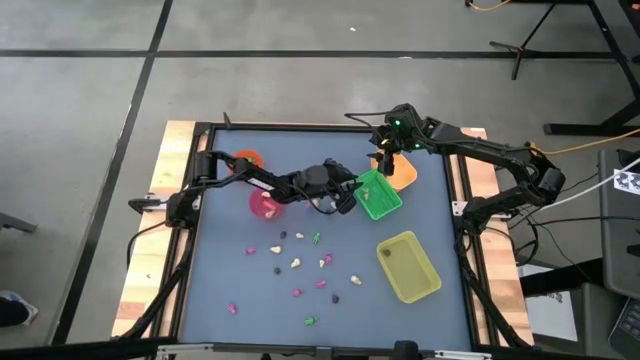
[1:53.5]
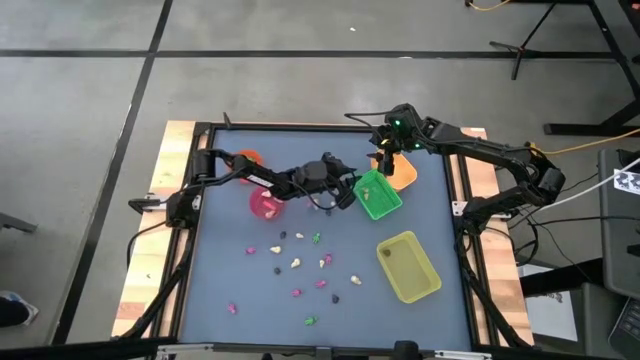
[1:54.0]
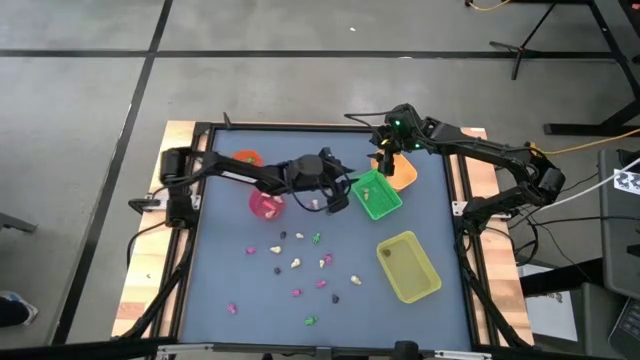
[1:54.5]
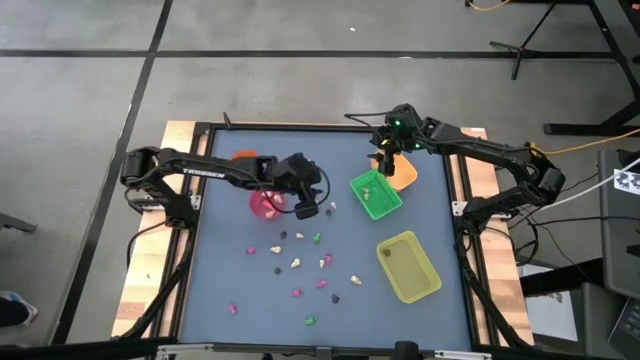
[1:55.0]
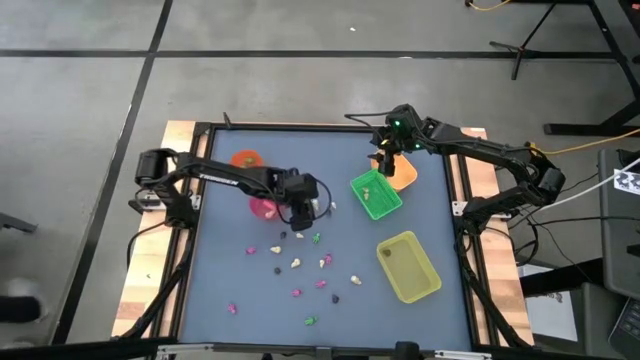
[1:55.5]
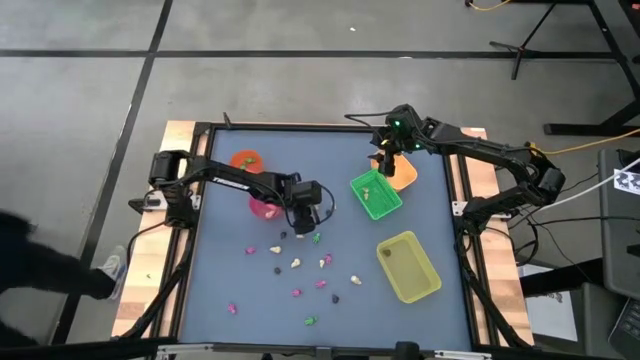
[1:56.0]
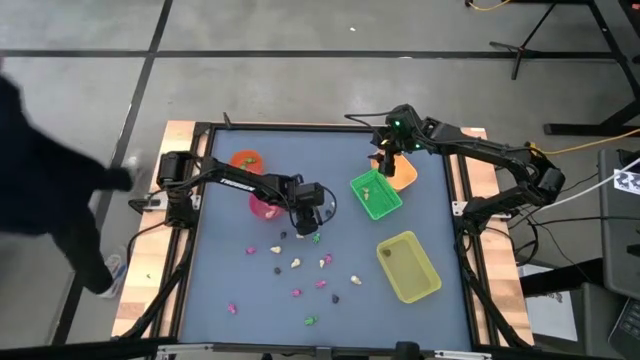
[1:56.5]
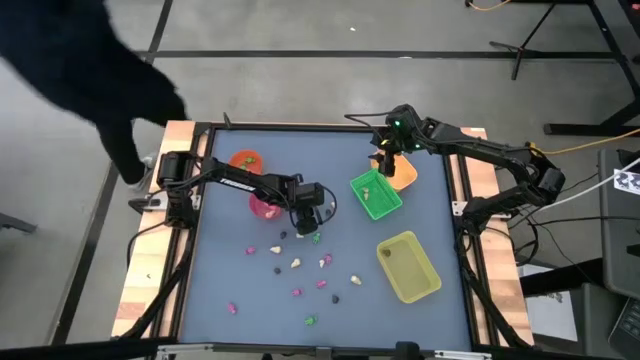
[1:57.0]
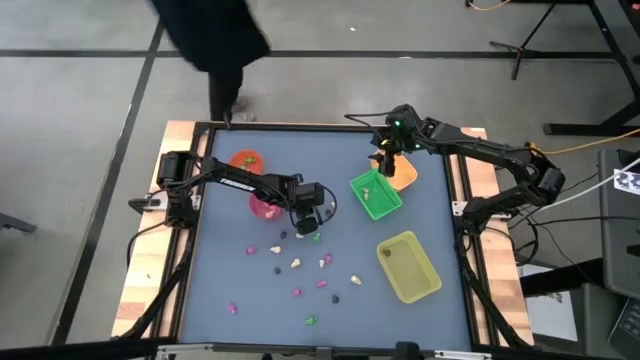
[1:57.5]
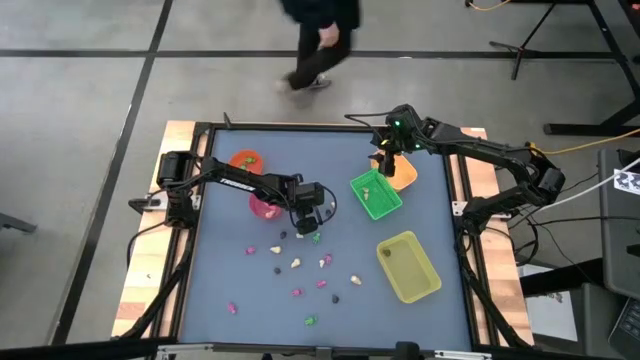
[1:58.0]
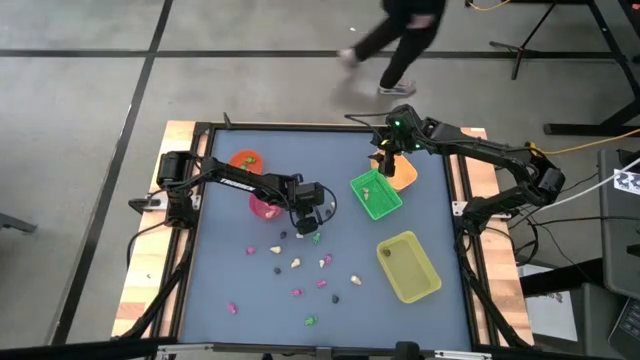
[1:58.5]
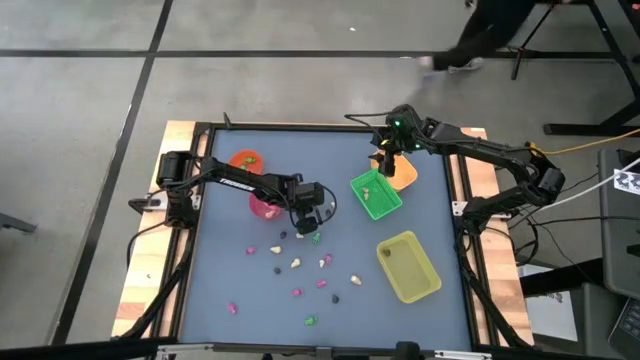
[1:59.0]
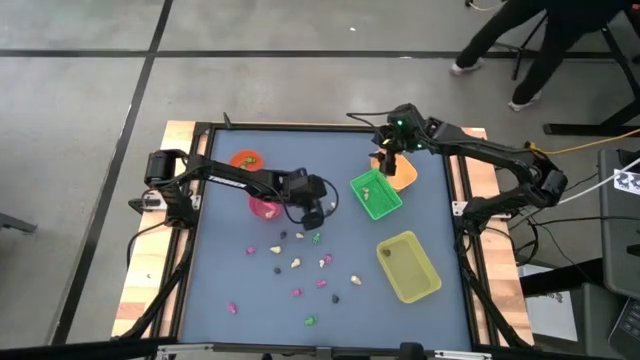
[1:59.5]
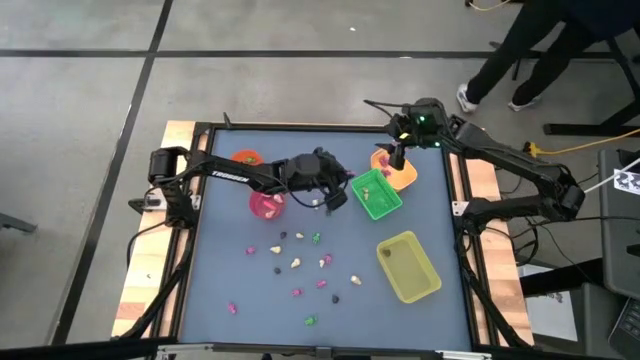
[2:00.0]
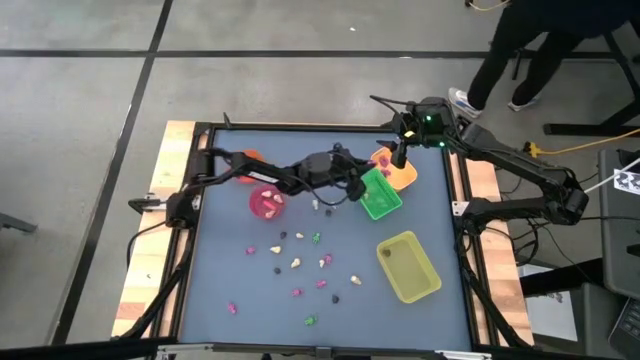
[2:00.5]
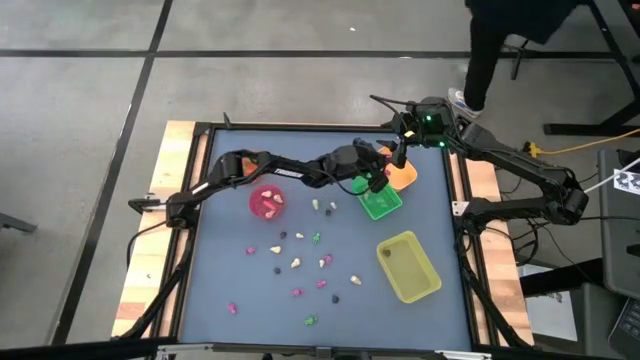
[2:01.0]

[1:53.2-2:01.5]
Task: Sort Halloween decoration
Put the pink skeleton toy into the yellow bin

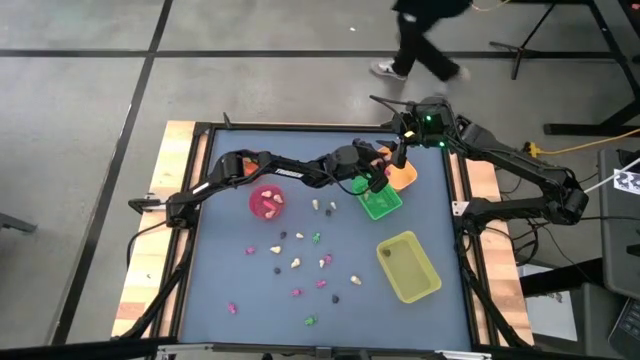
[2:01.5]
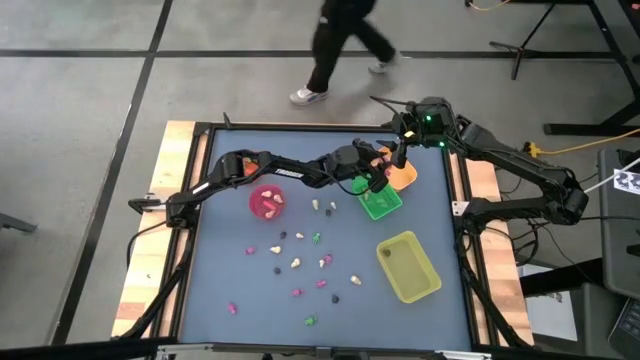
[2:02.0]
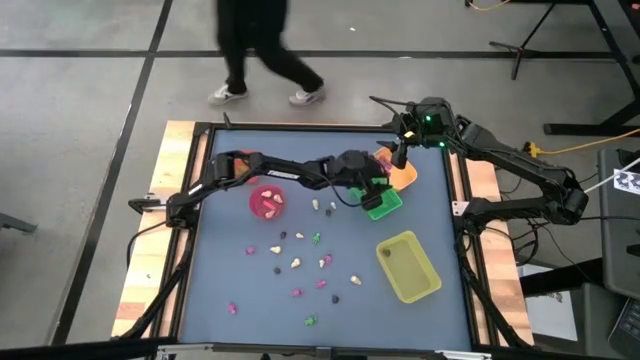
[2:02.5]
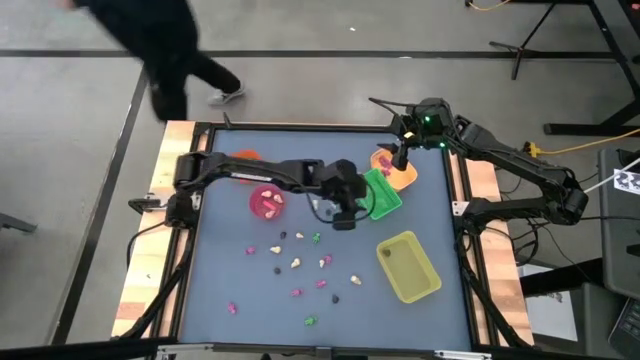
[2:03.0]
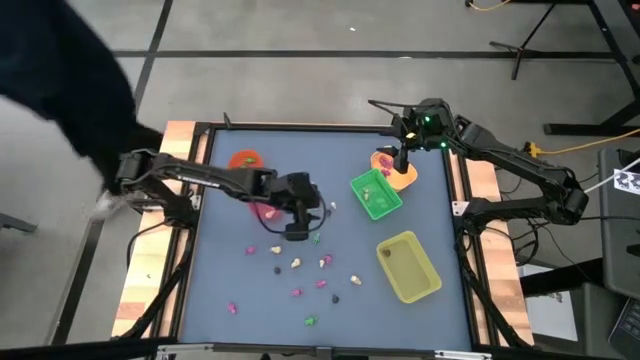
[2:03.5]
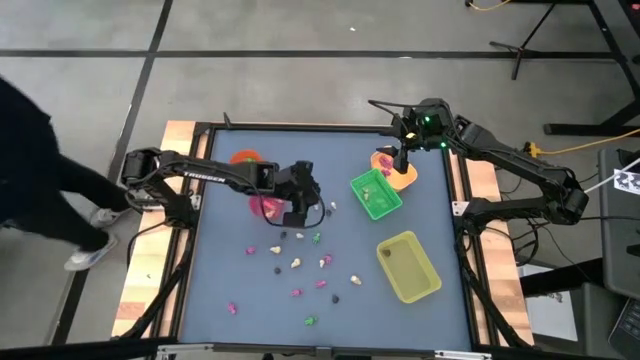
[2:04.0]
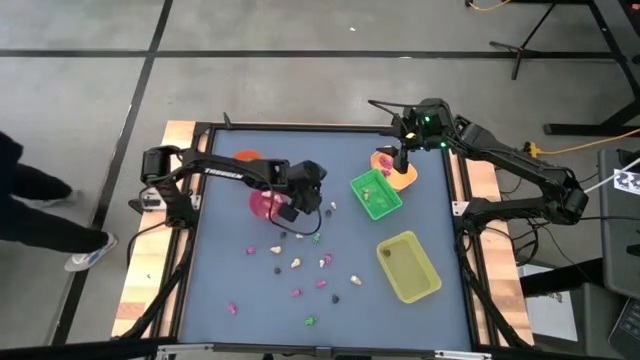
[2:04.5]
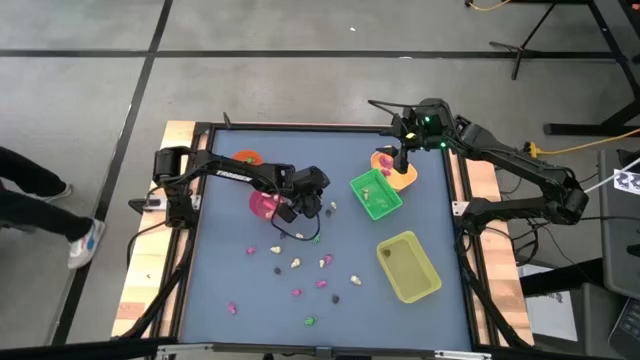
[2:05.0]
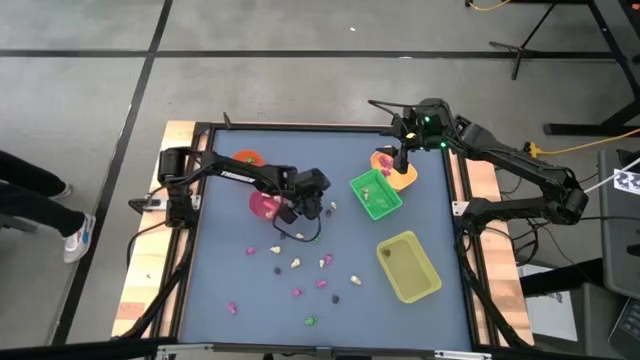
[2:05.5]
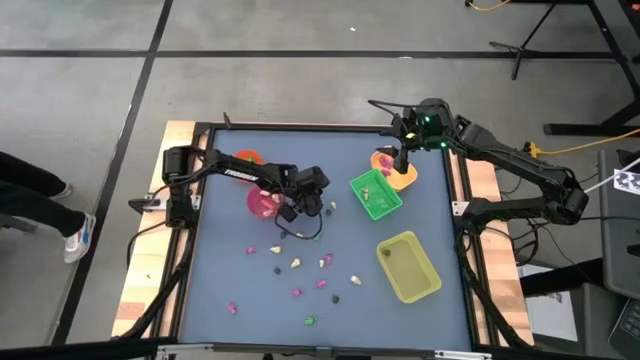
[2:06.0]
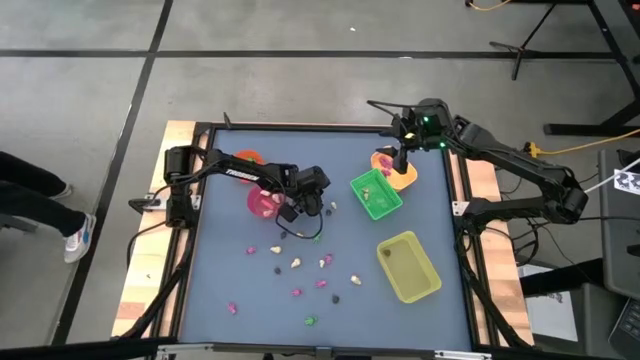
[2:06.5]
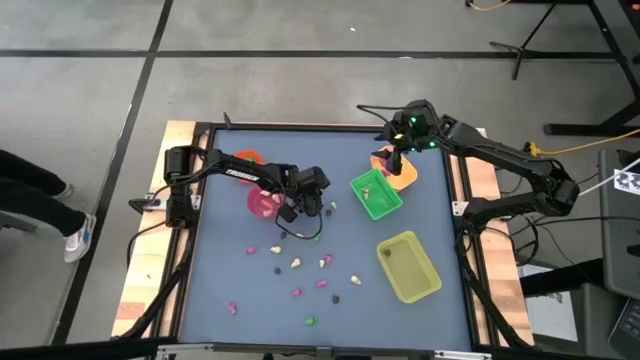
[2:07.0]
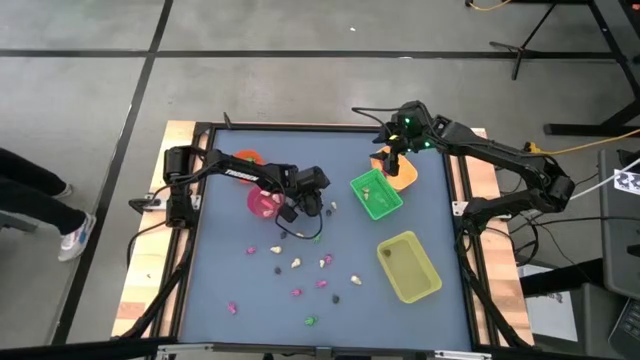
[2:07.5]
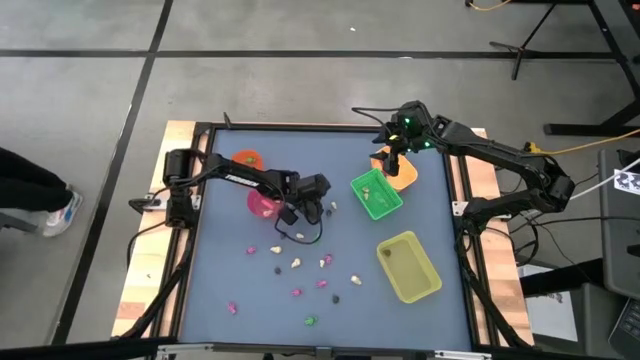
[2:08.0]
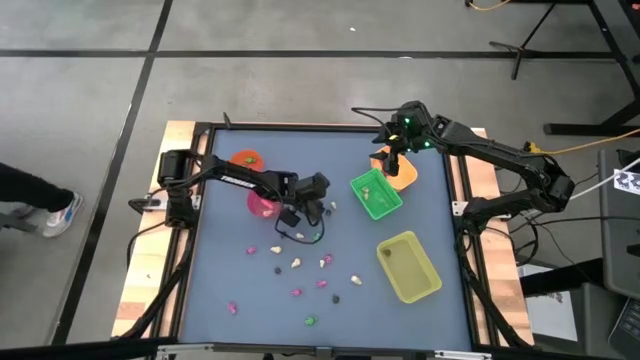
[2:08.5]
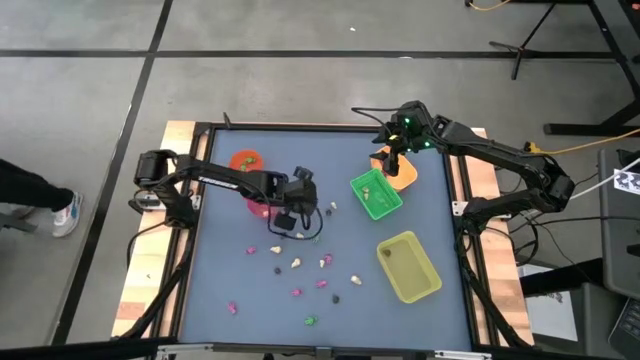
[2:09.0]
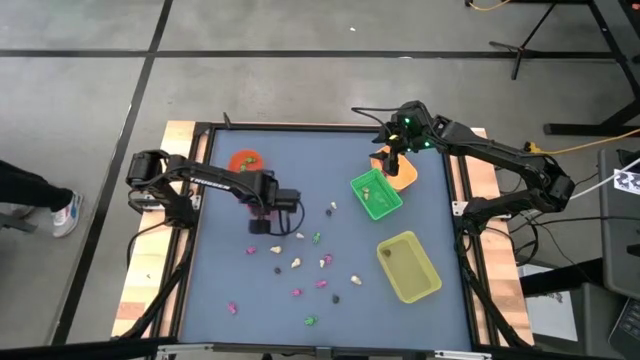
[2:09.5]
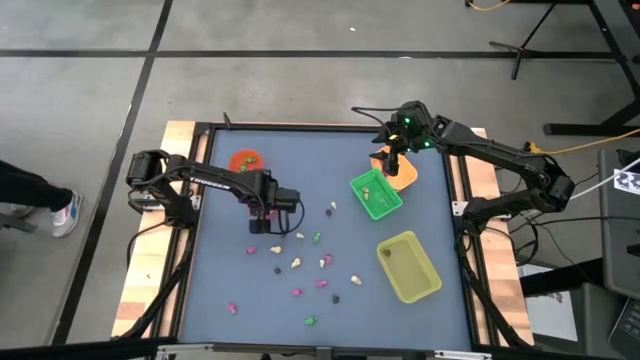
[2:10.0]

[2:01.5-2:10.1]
Put the white skull toy into the pink bin

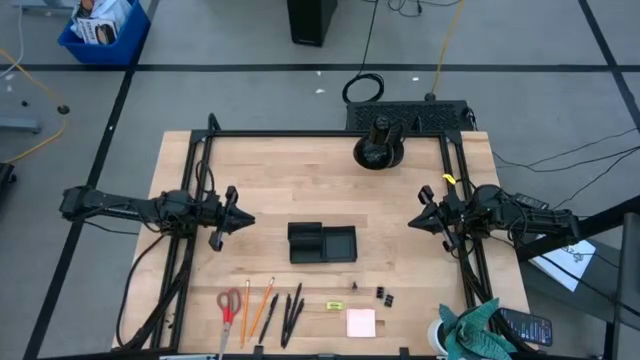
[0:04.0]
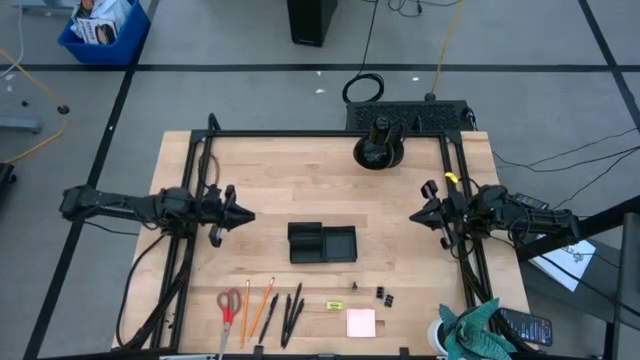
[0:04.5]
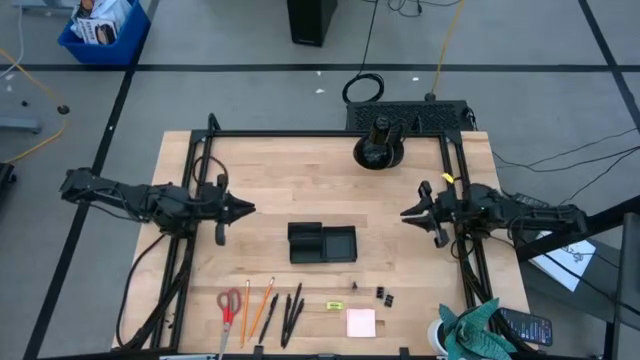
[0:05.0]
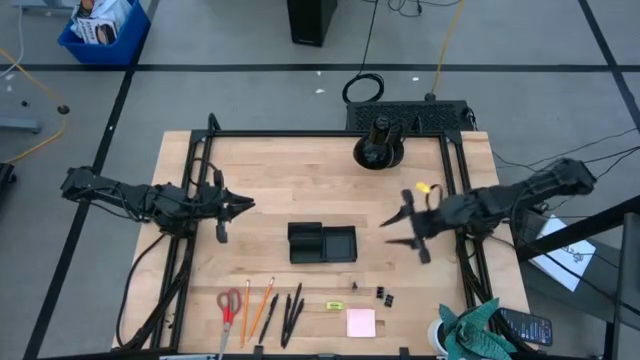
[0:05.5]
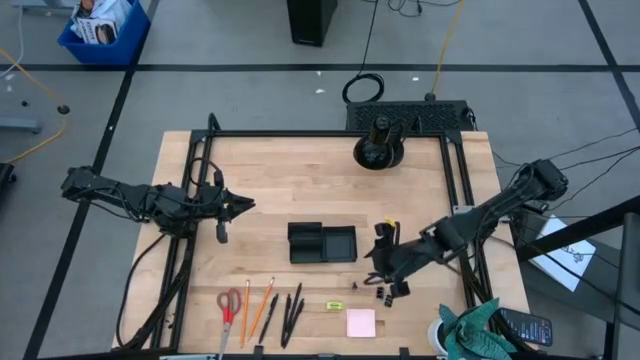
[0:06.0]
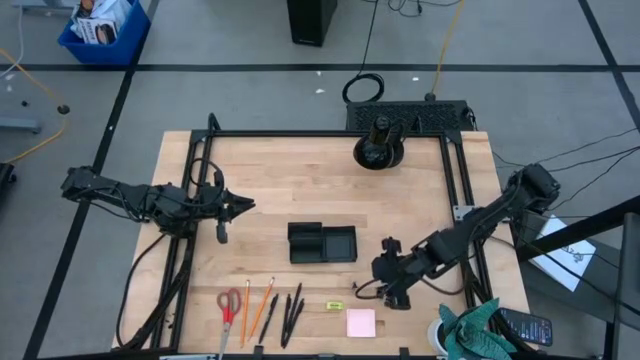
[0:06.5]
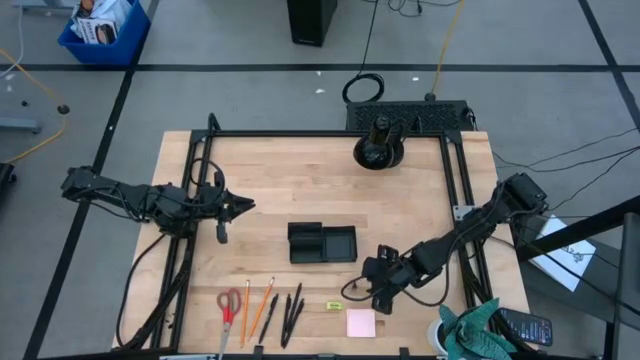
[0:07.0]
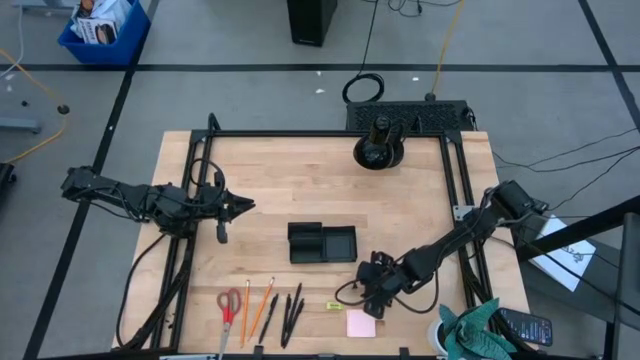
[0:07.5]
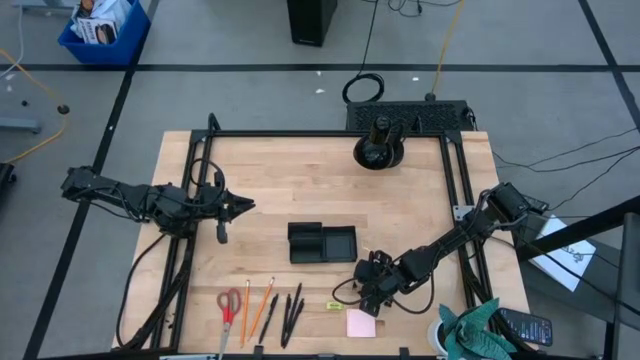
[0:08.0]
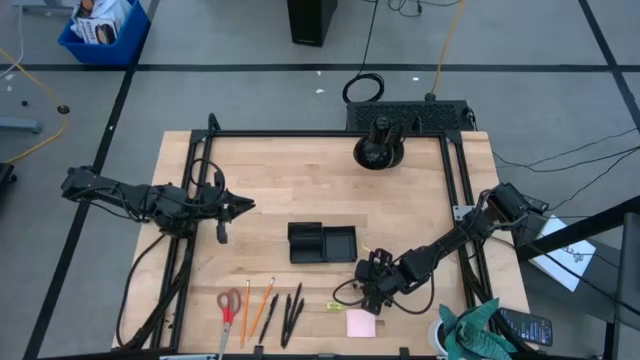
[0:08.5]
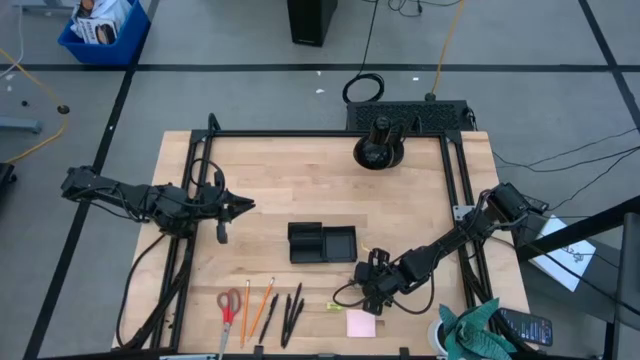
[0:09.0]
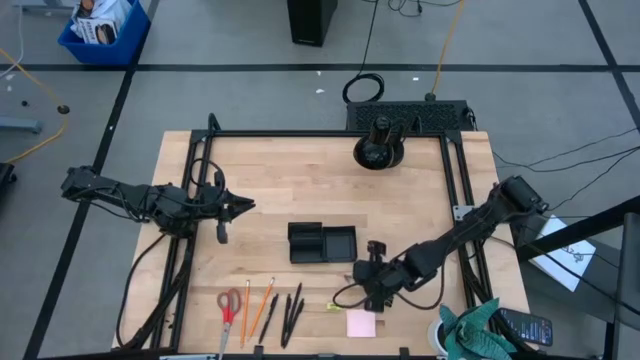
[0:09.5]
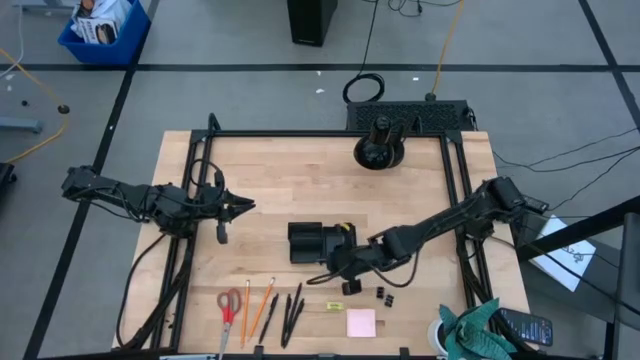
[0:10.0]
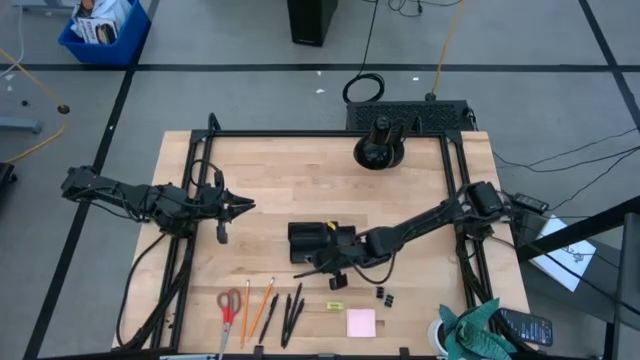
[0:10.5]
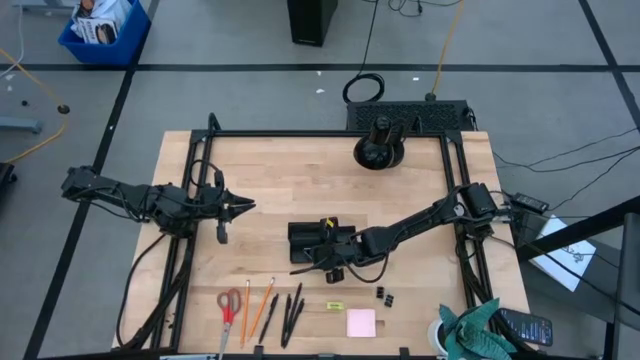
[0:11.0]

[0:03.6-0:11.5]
Task: Pick and place office supplies into organizer
Put the black binder clip into the black desk organizer
